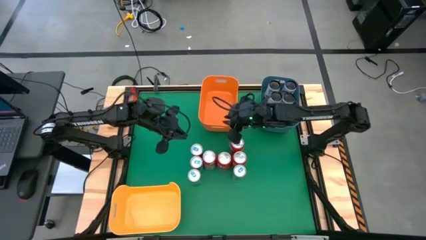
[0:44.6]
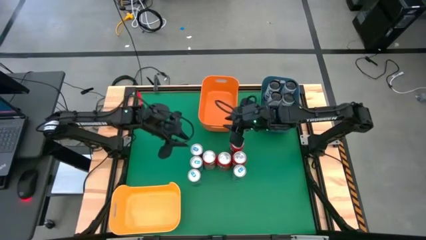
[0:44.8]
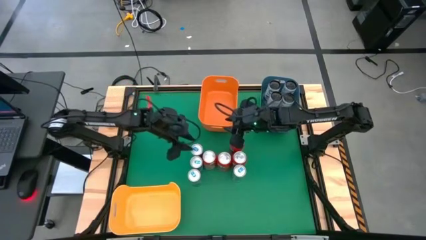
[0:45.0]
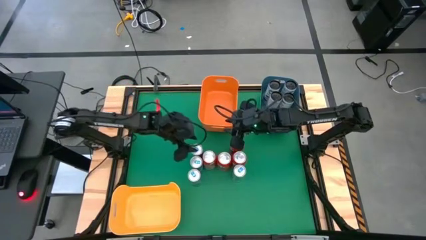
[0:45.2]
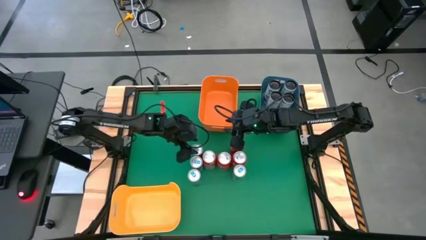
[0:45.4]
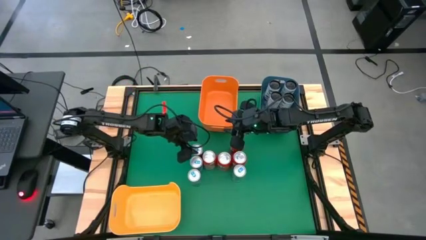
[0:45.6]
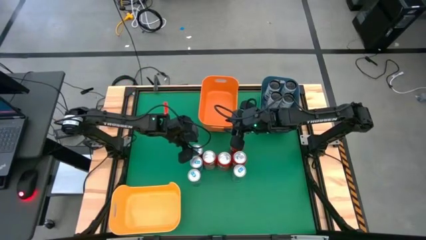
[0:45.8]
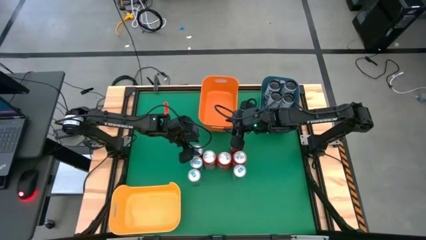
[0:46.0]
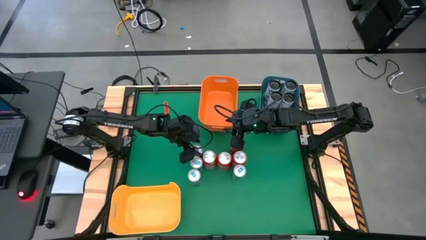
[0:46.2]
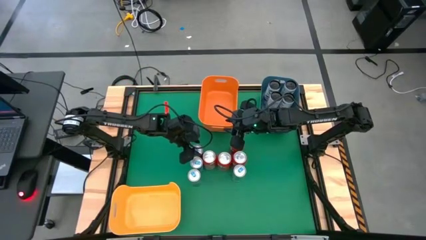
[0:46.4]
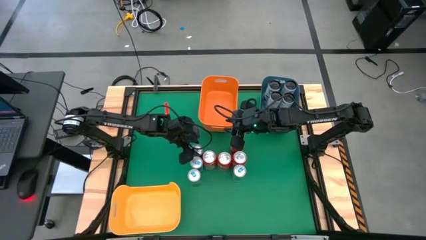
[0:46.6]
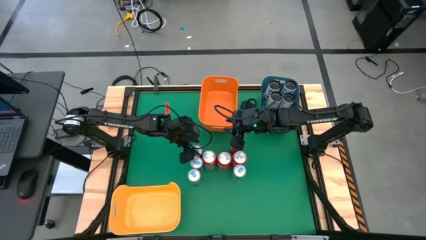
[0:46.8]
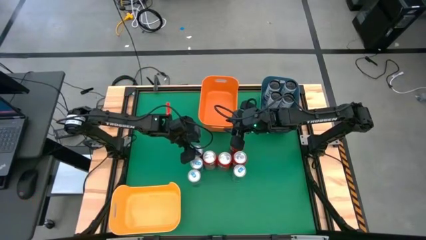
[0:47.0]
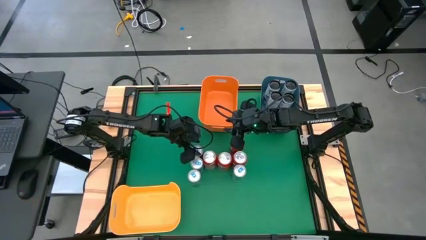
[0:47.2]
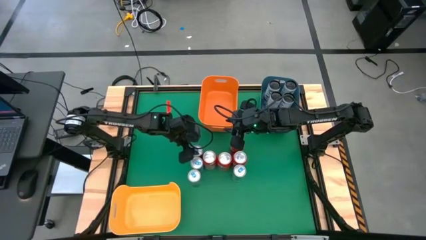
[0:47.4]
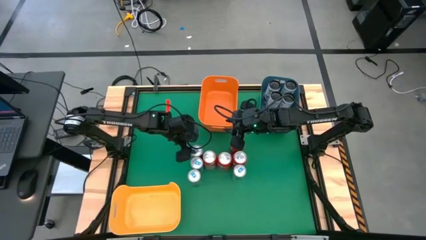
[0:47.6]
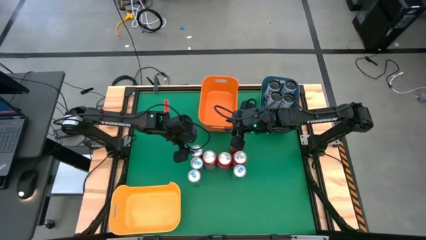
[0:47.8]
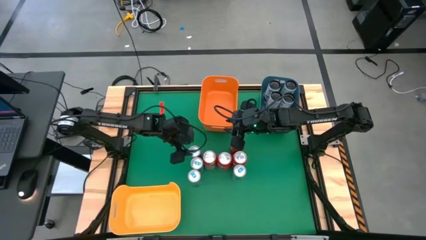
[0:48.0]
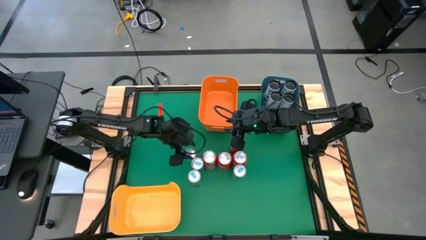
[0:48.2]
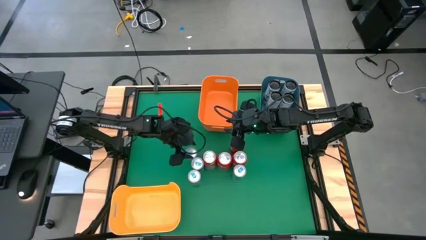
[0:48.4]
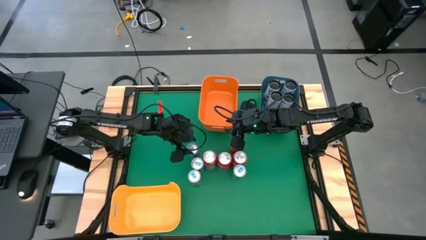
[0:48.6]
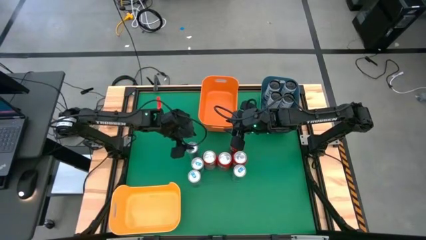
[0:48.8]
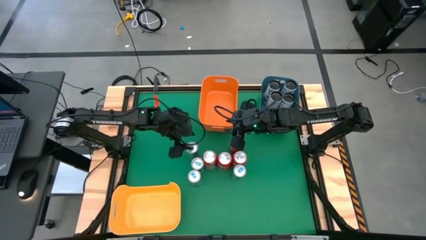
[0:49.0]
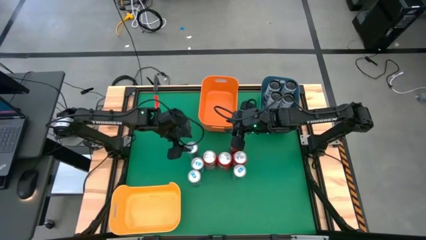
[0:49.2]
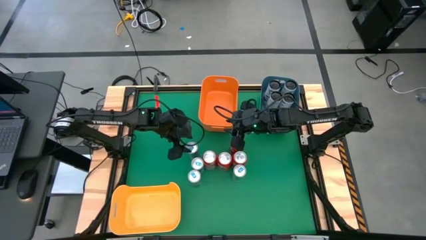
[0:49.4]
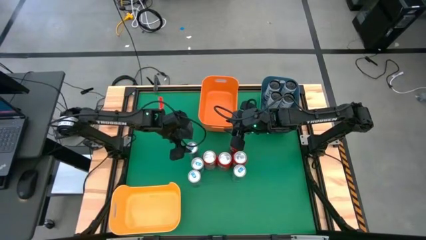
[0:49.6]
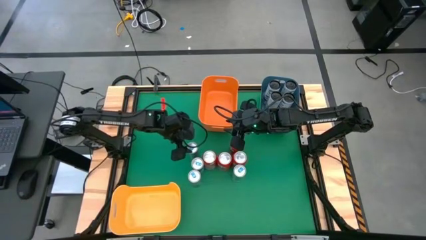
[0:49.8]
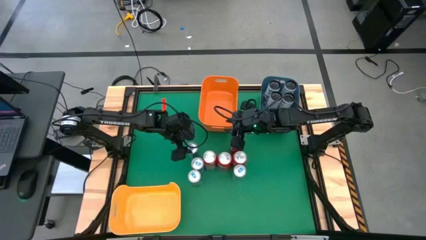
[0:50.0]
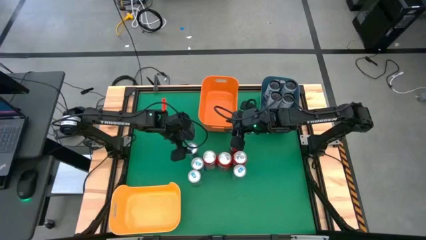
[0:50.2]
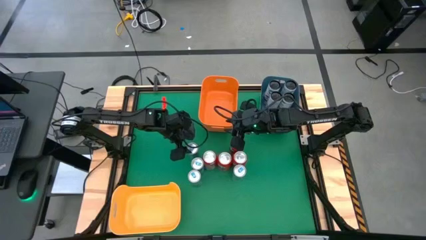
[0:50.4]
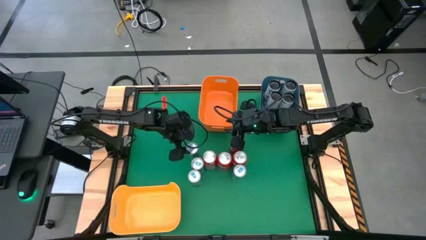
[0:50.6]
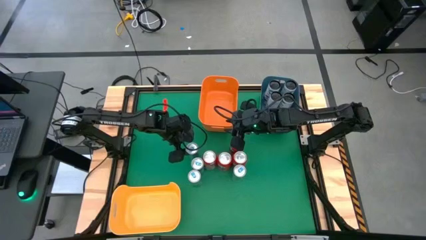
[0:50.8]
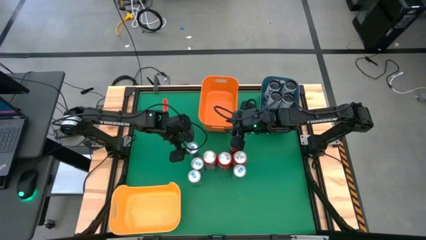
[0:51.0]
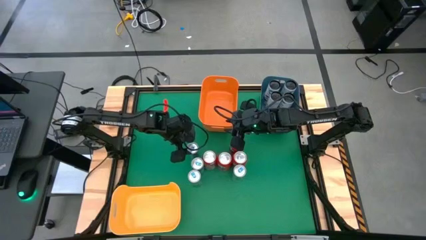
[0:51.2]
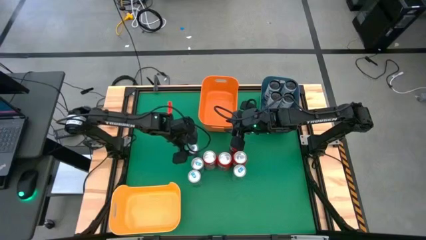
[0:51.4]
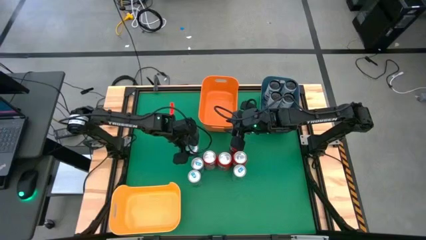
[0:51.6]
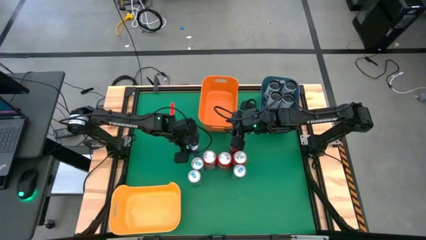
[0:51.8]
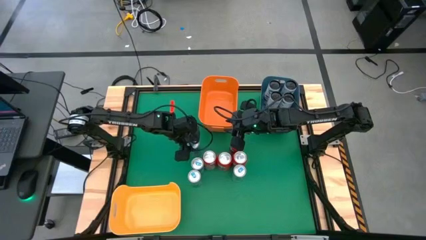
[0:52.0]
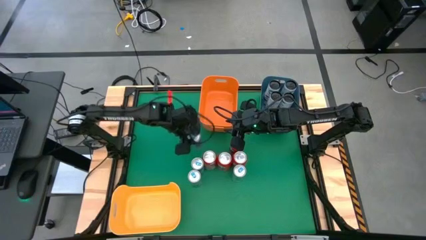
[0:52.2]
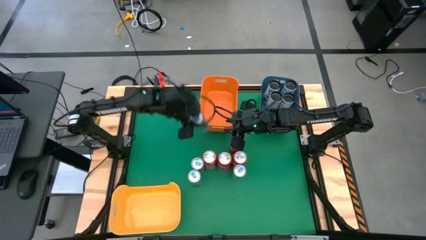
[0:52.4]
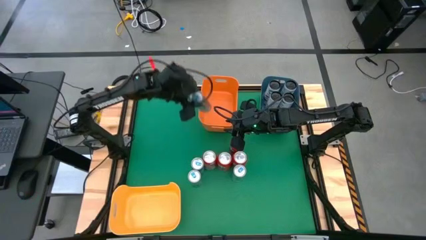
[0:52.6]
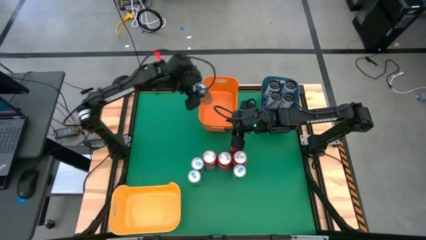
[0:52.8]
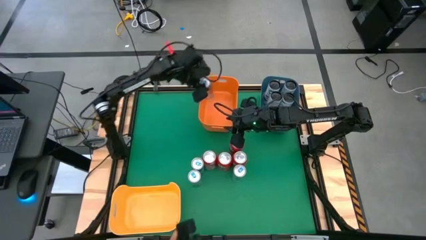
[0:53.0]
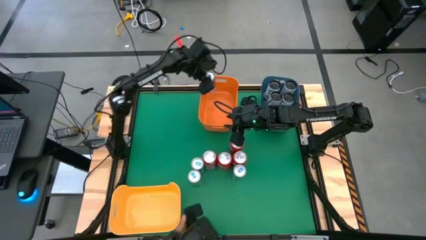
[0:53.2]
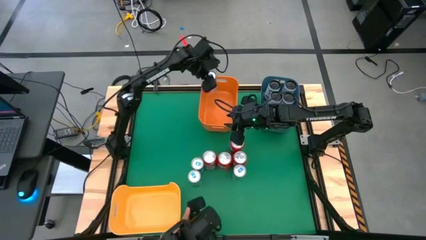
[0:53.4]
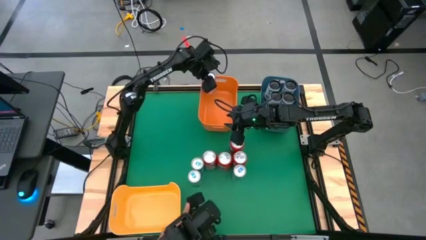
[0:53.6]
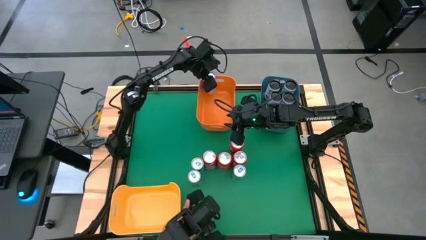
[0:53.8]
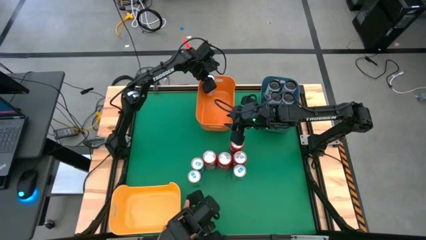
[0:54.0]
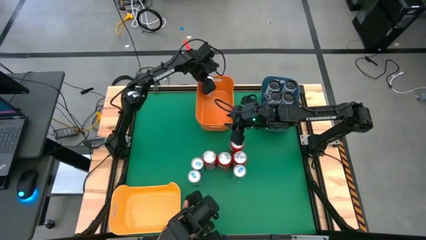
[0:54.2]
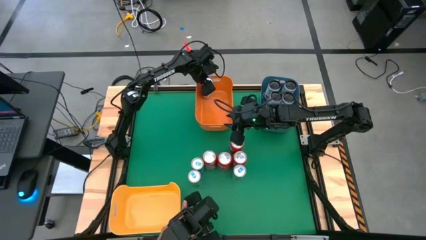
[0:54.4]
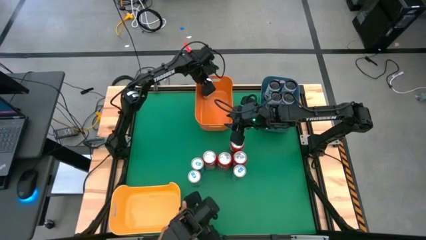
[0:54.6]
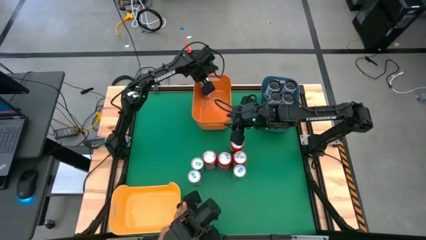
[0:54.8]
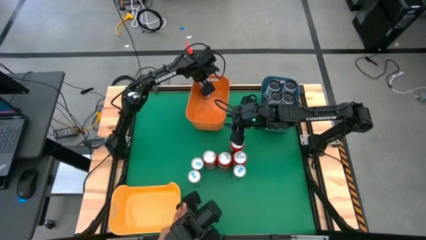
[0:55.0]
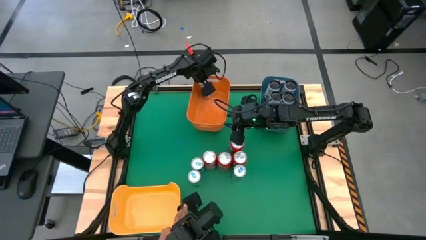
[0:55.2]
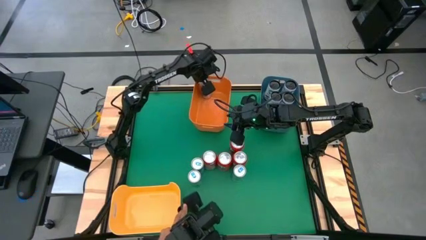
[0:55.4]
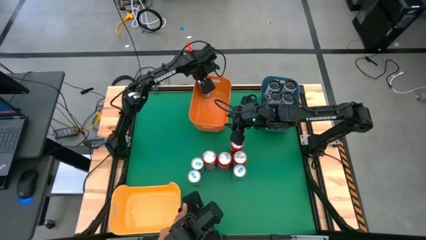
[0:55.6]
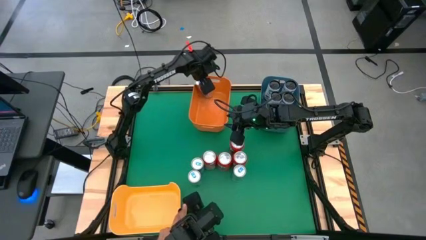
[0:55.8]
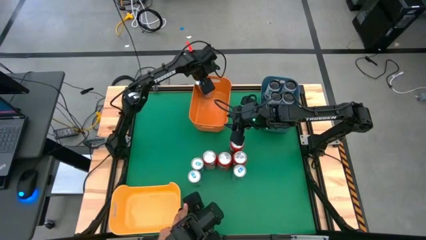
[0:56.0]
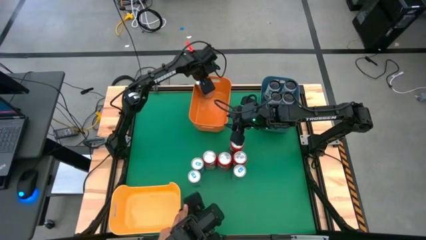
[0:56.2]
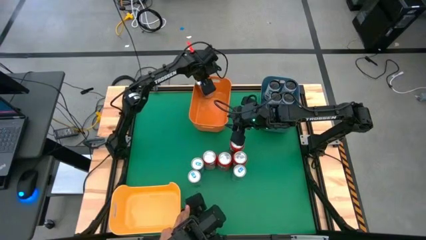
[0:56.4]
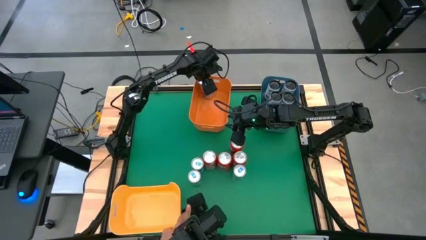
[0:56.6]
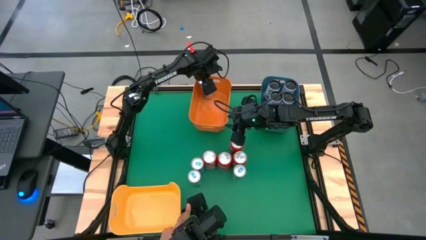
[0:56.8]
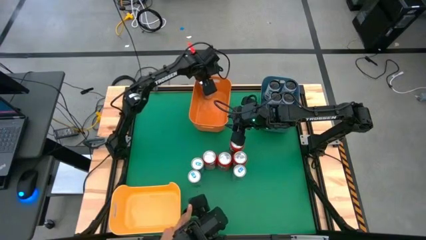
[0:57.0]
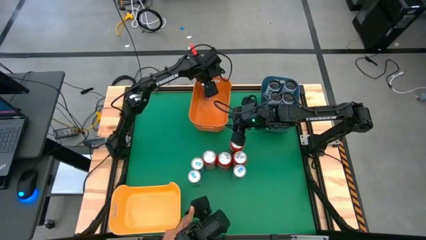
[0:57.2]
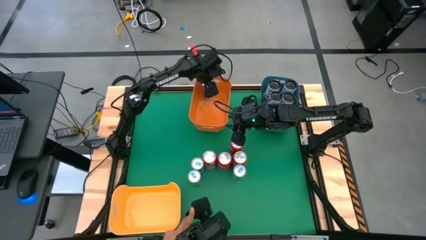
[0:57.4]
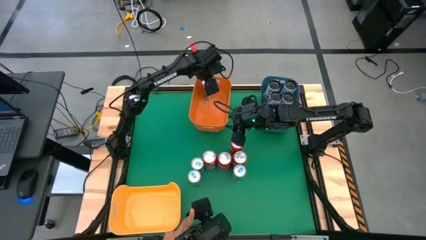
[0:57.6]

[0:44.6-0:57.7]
Task: Sort soda cans
Put the blue soda can into the orange bin

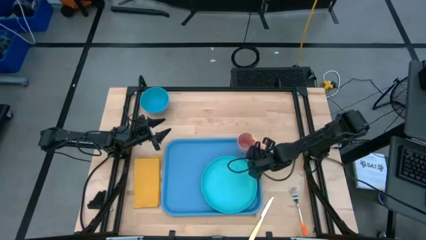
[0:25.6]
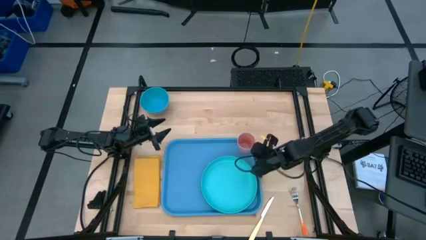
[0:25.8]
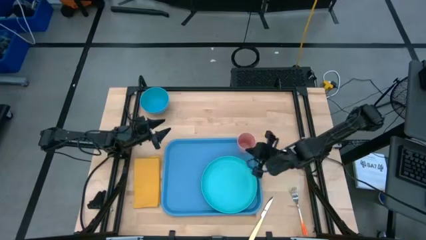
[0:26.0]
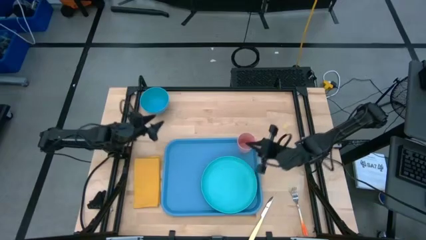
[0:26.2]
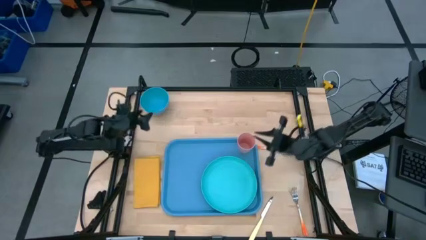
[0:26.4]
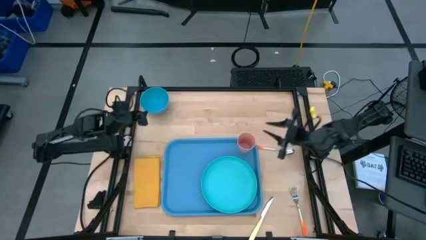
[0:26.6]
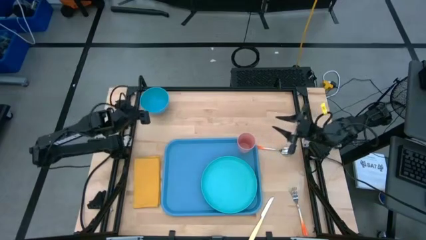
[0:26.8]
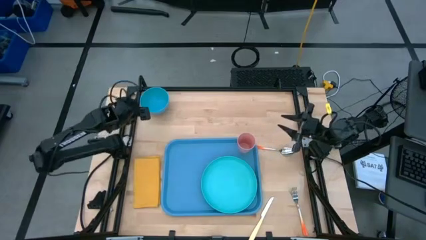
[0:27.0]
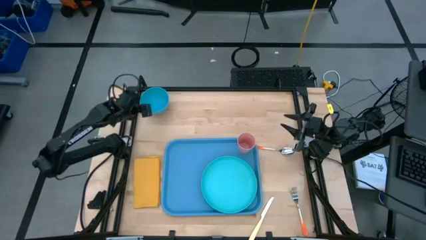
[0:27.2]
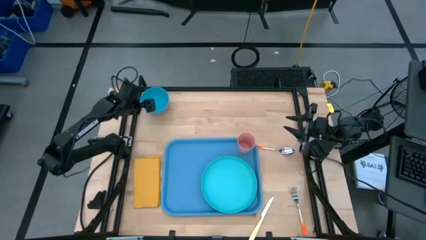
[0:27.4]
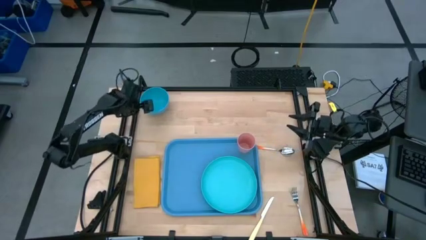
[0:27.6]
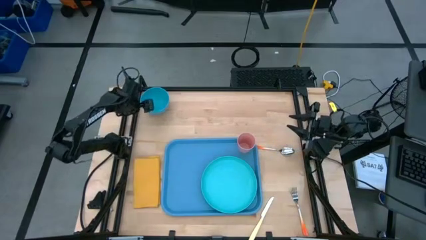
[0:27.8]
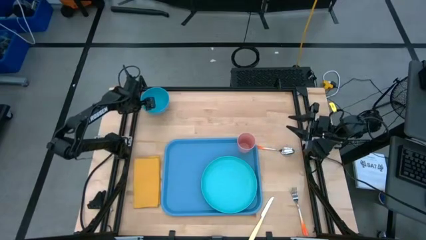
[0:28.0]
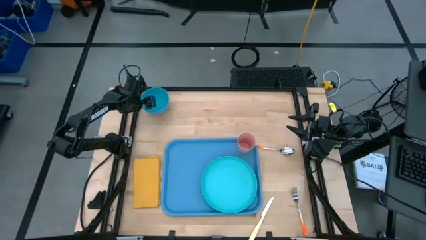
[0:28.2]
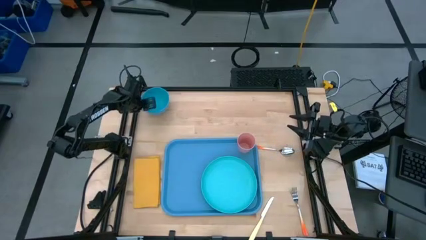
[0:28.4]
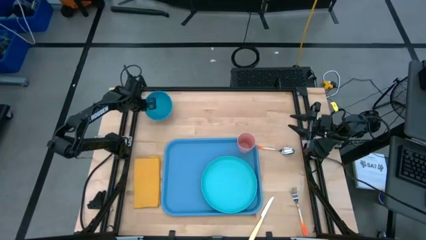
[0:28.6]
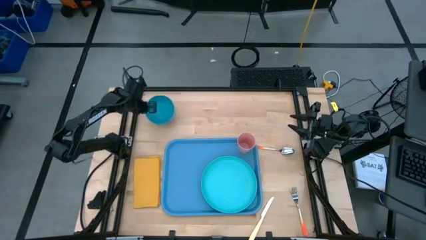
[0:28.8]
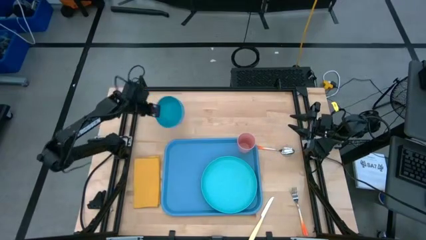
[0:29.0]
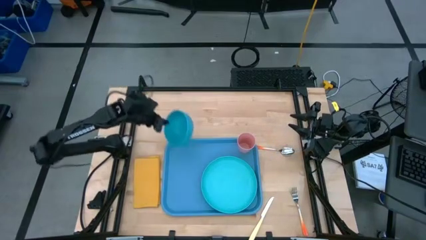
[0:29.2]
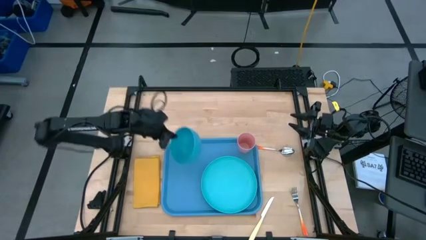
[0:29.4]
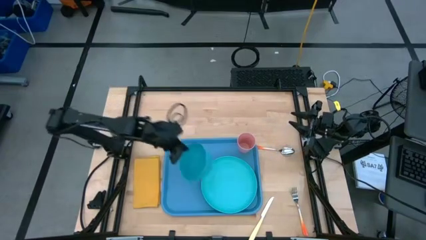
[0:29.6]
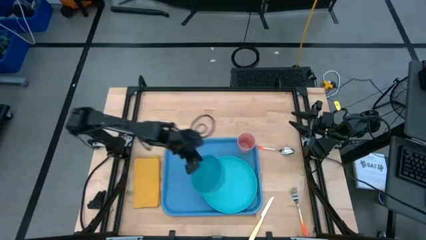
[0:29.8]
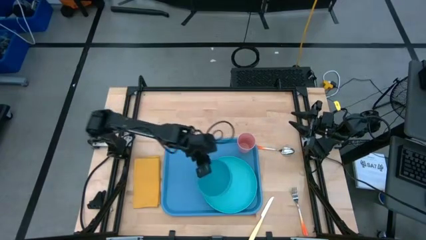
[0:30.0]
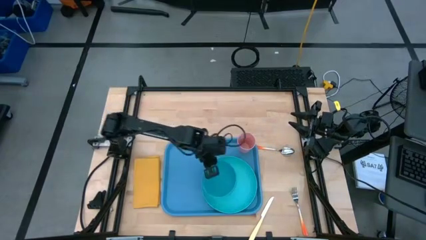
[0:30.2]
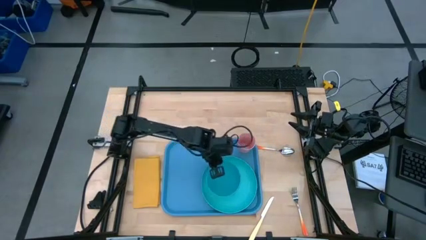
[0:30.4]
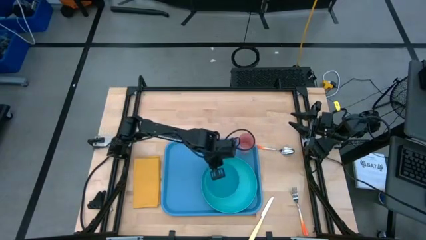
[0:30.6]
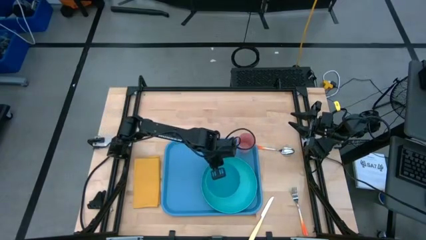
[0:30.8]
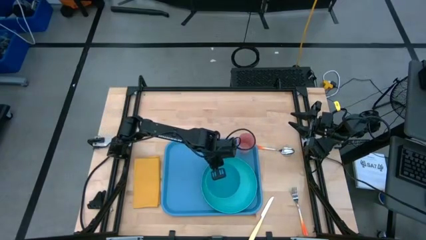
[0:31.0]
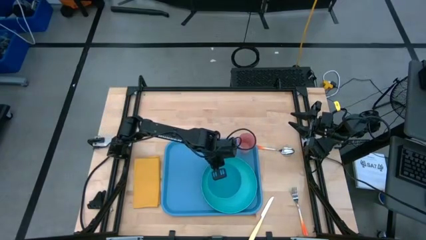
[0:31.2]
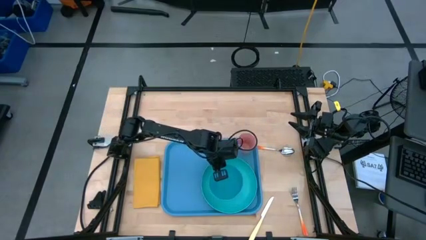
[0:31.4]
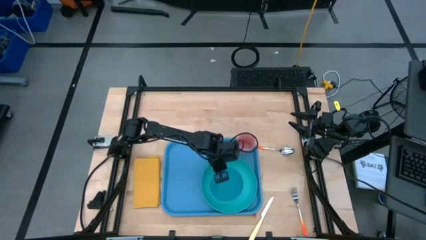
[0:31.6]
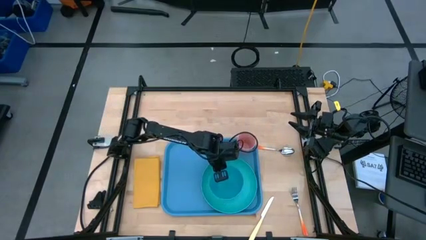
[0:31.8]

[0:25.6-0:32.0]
Task: Set up tray
Put the blue bowl on the blue plate
